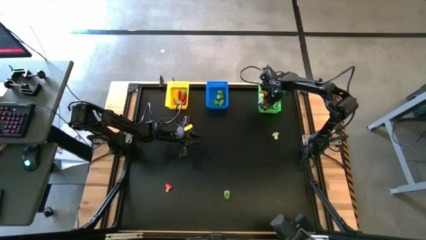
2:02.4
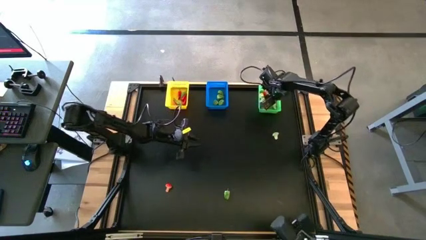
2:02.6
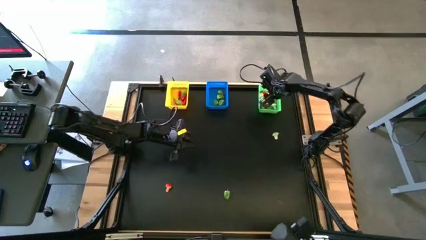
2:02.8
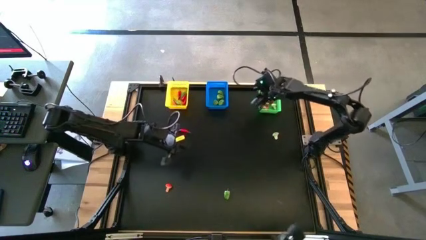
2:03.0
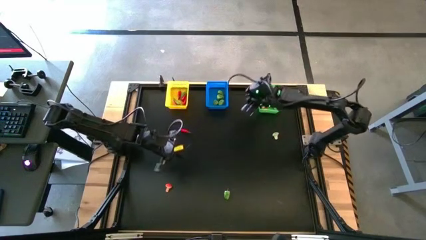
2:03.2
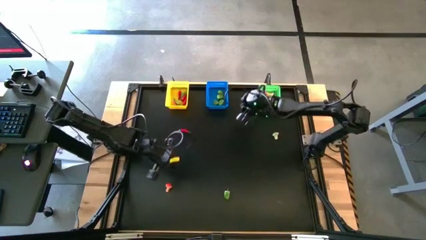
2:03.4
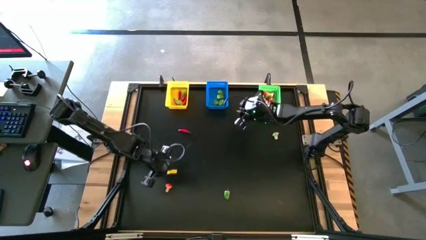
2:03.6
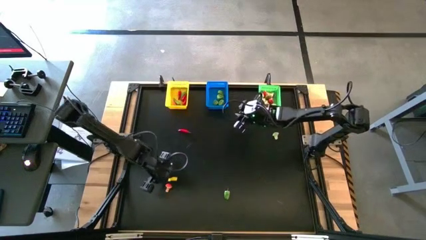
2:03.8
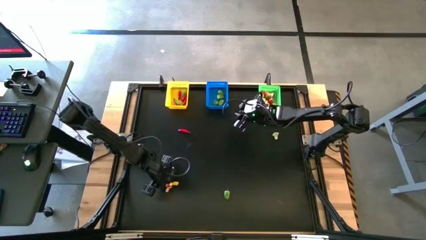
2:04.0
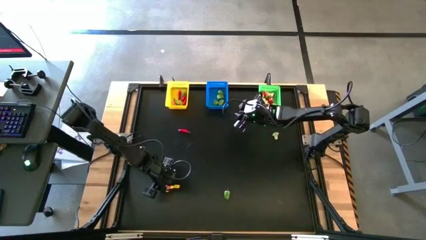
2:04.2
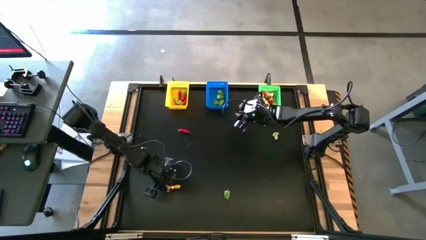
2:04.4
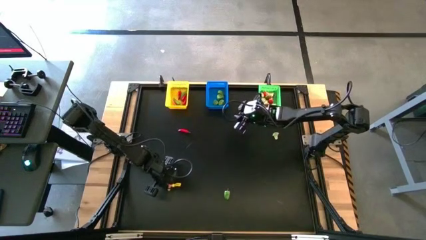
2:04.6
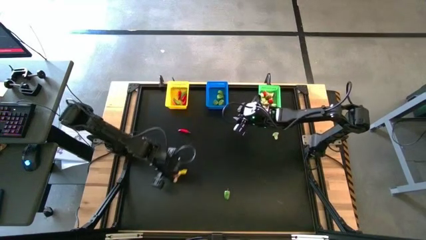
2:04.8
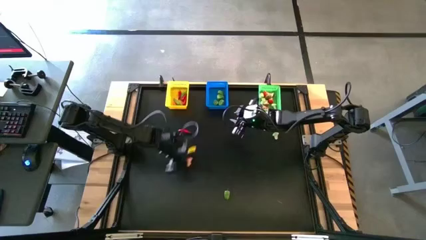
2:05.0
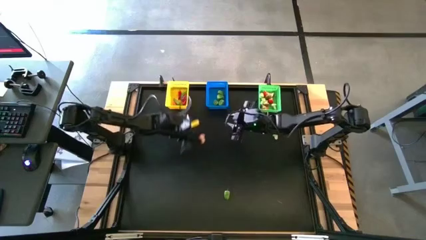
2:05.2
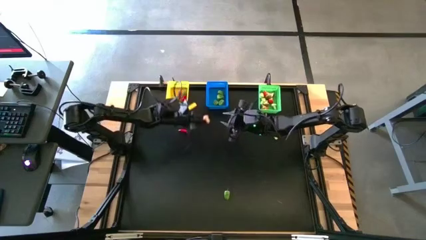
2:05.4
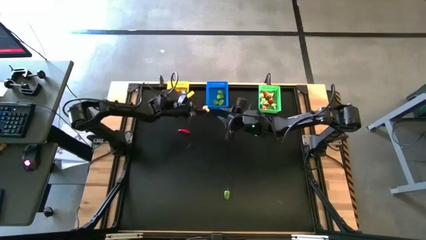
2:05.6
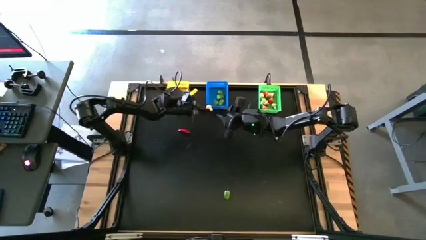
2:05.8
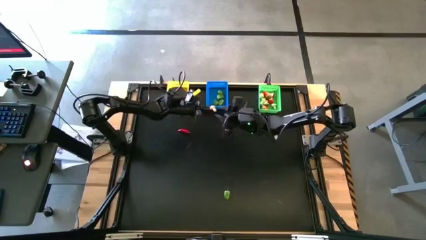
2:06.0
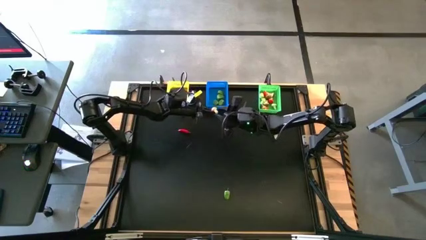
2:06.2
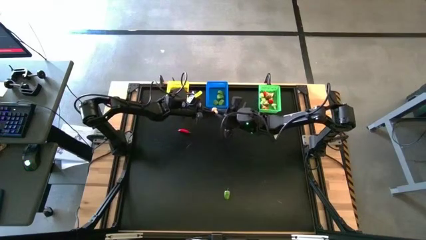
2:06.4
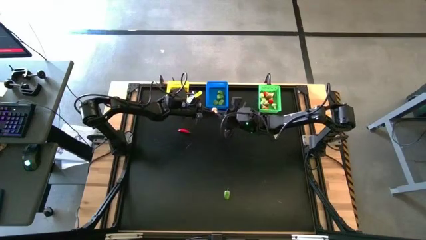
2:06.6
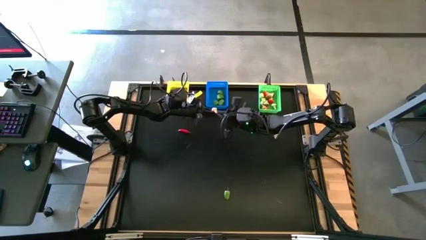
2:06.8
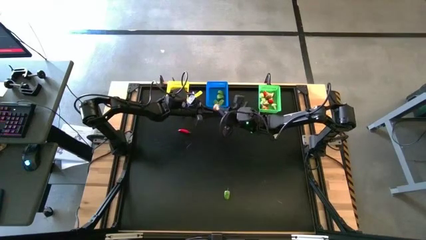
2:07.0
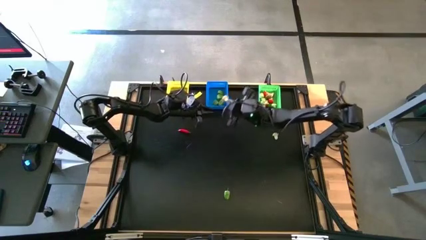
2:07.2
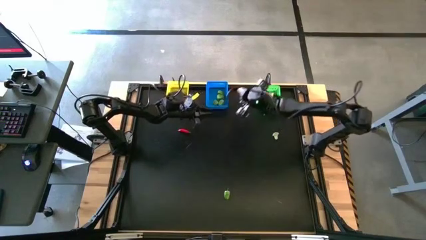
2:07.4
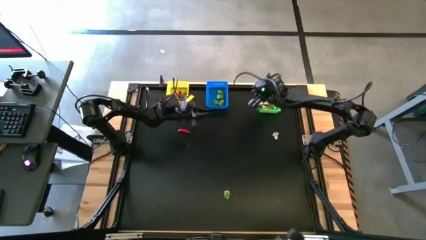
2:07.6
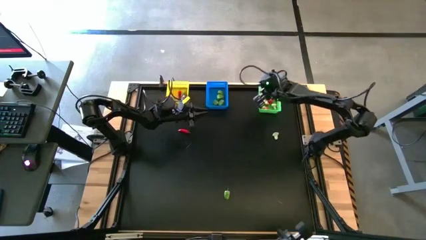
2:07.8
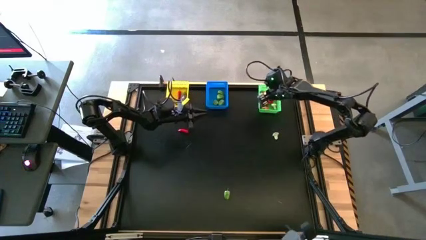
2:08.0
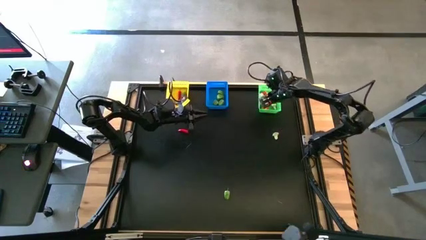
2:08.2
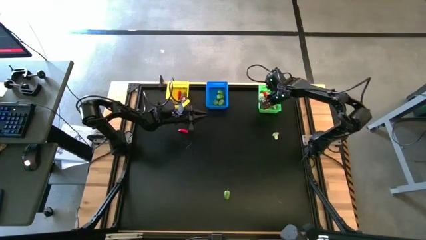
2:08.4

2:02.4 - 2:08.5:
Task: Sort produce into baskets
Put the orange mushroom into the yellow bin

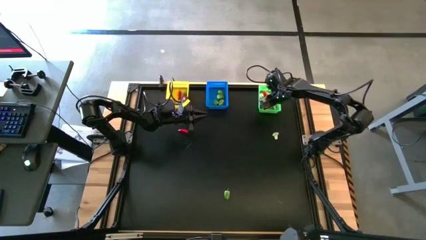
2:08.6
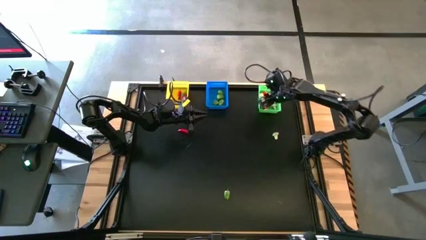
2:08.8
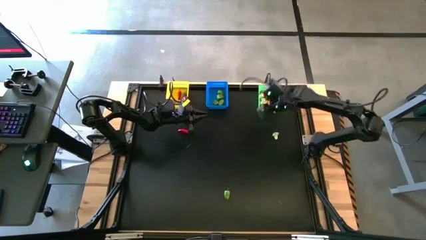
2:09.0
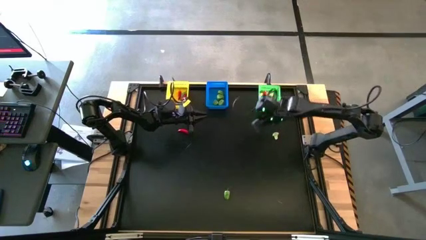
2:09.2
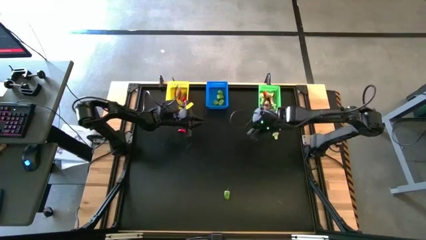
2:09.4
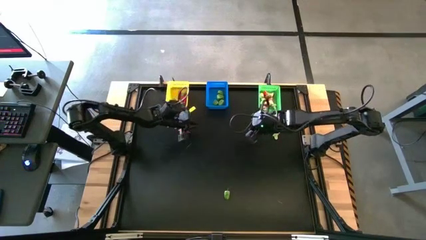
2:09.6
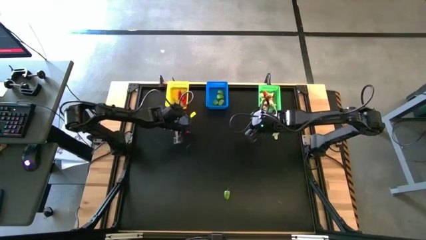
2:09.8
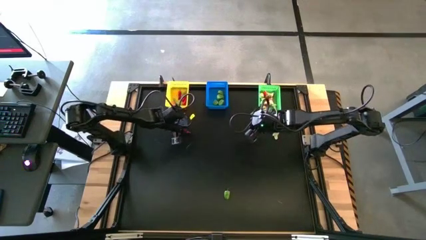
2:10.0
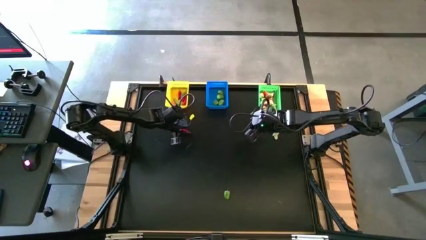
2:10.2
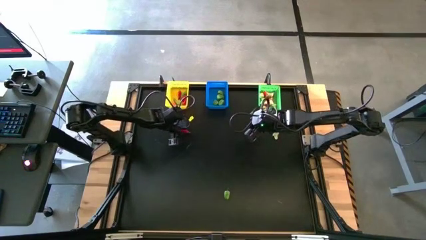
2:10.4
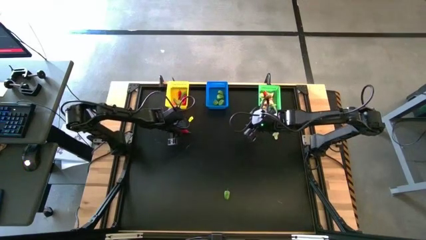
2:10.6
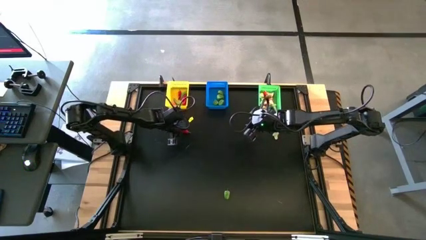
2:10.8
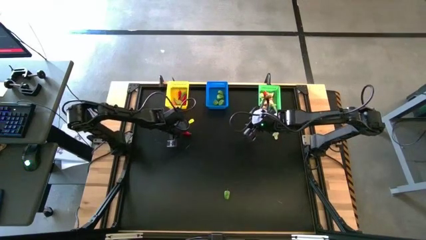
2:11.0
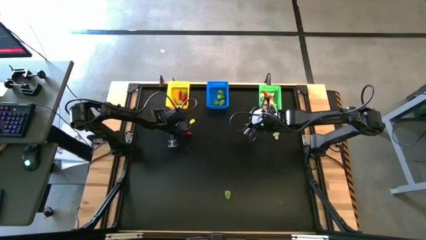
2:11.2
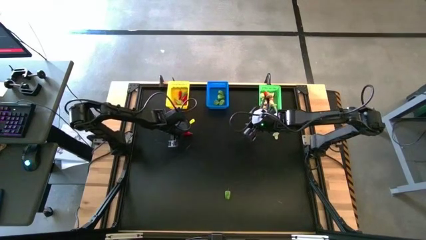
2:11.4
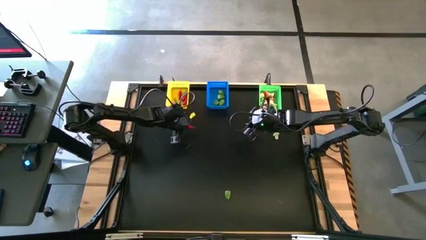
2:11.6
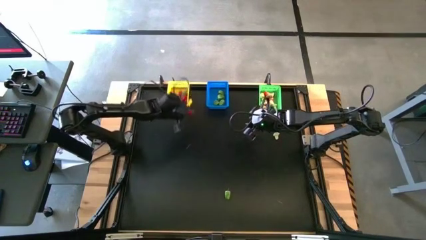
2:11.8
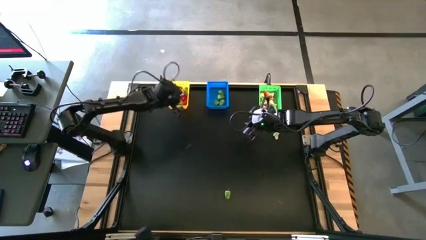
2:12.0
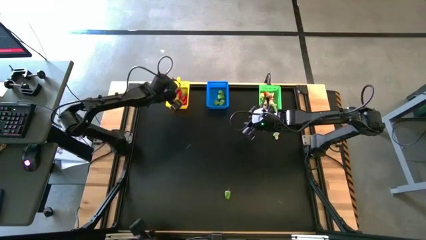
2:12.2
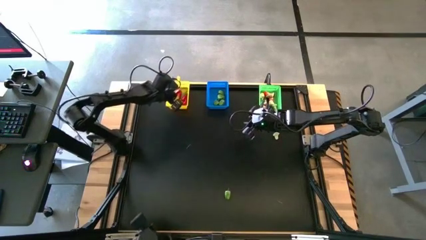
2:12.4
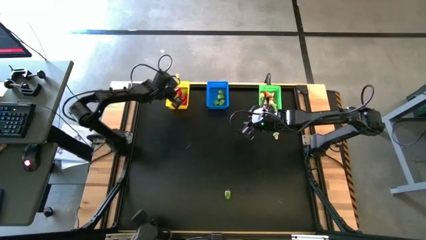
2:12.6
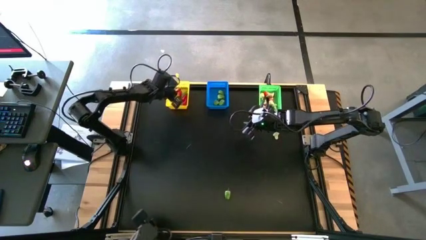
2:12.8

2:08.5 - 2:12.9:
Put the red chili pepper into the yellow bin

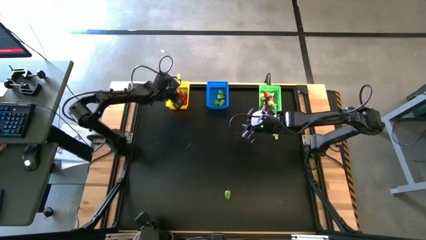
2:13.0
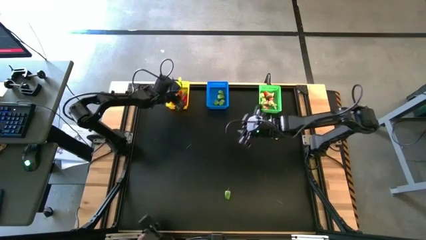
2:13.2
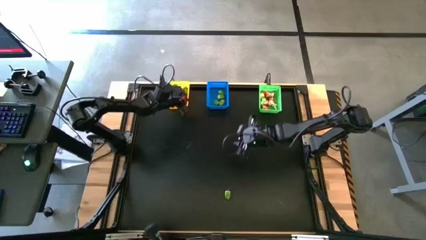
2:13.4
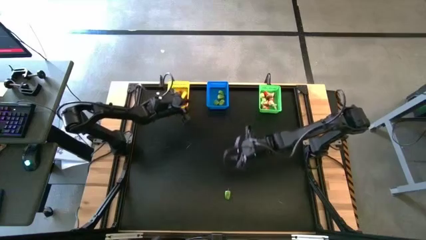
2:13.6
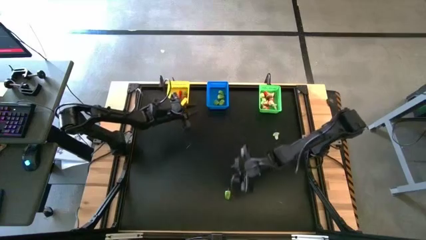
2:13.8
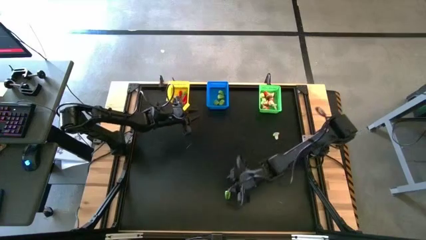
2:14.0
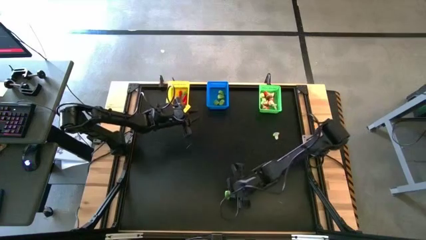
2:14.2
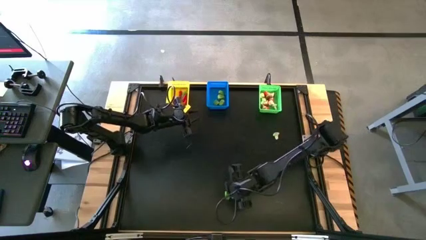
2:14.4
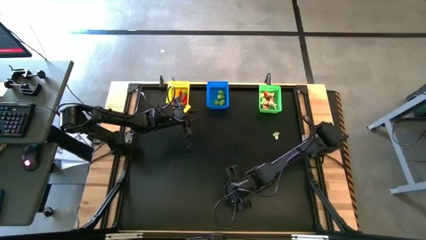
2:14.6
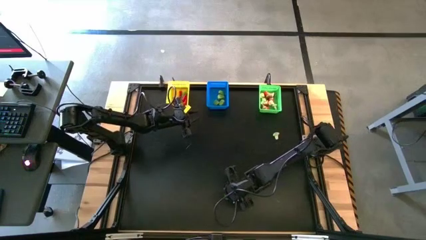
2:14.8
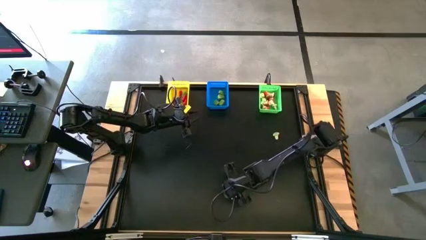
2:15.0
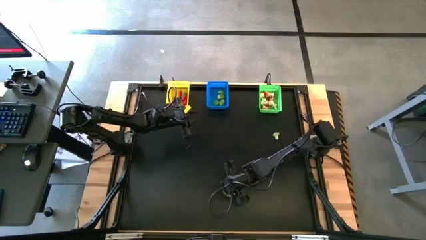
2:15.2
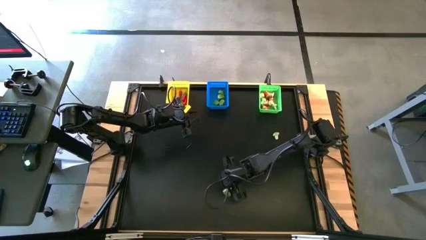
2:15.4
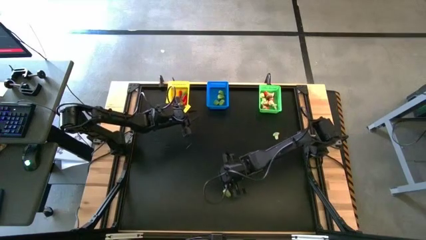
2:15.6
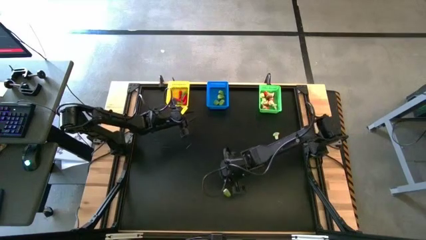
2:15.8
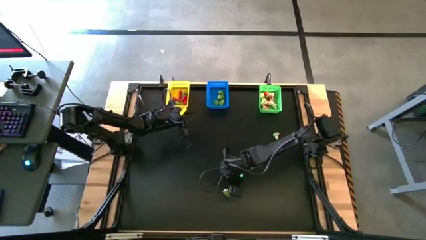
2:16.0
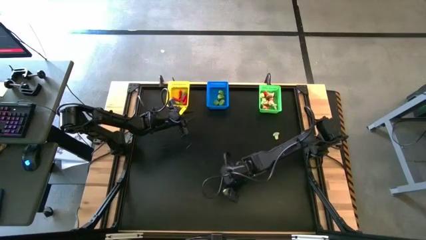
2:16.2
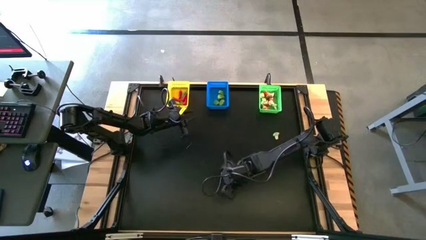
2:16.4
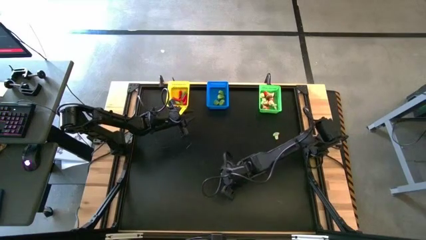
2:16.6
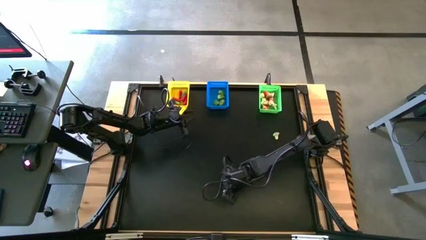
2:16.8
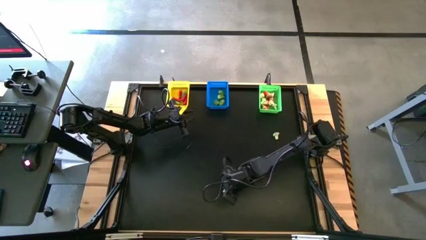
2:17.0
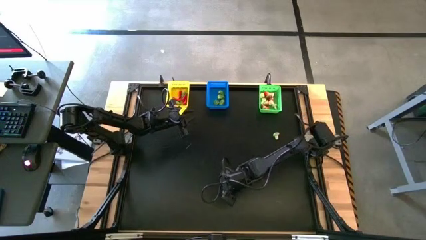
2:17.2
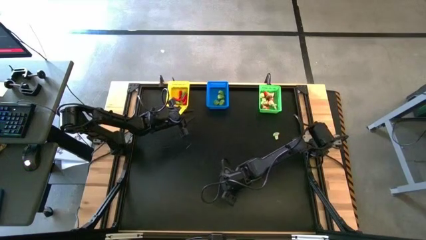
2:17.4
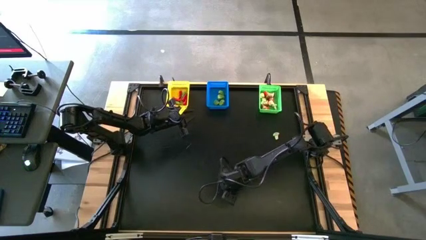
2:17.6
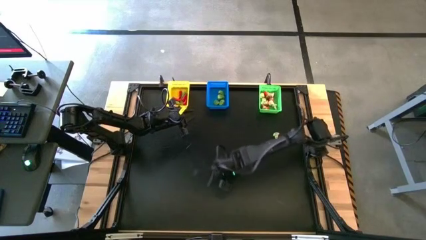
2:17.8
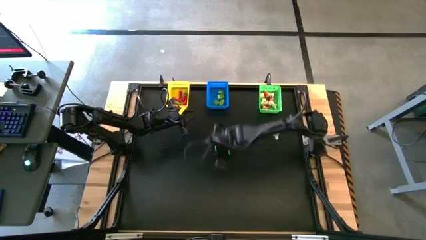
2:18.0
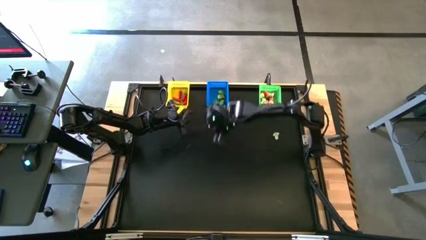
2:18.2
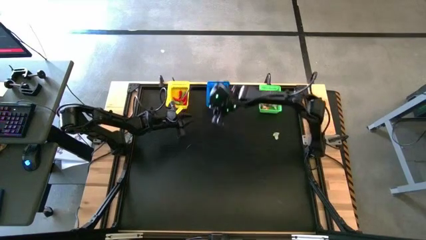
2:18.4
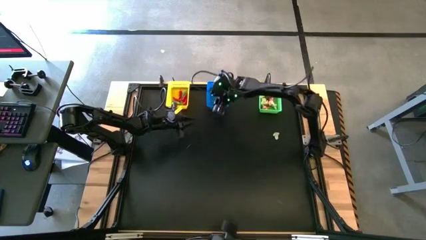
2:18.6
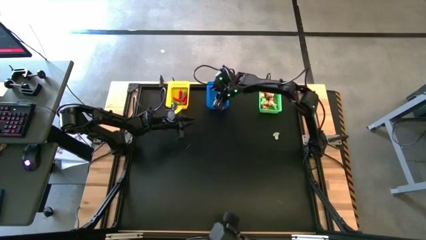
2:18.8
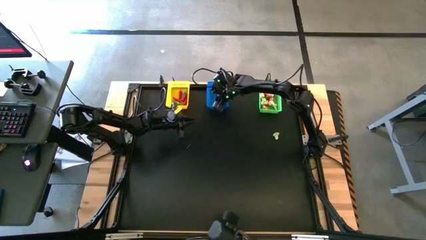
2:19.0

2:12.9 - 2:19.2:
Put the green chili pepper into the blue bin
